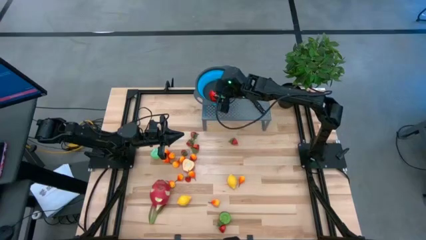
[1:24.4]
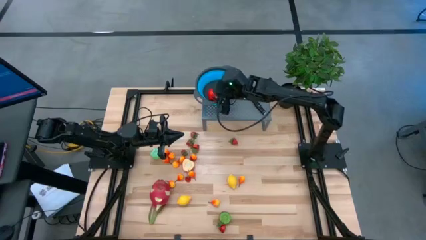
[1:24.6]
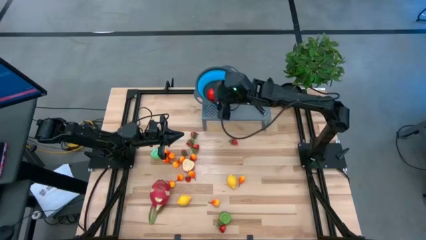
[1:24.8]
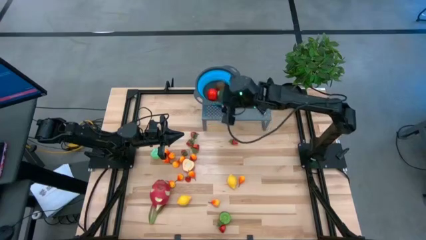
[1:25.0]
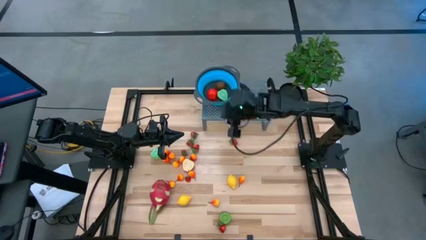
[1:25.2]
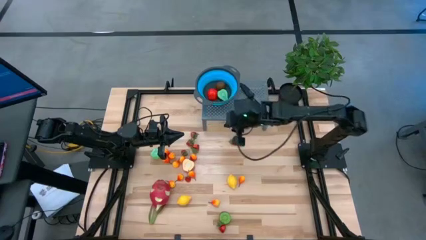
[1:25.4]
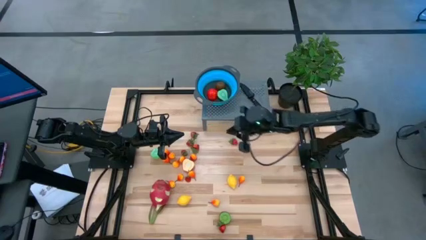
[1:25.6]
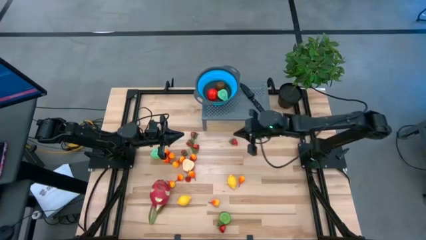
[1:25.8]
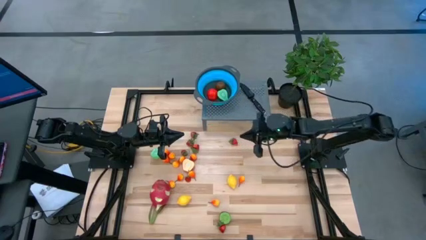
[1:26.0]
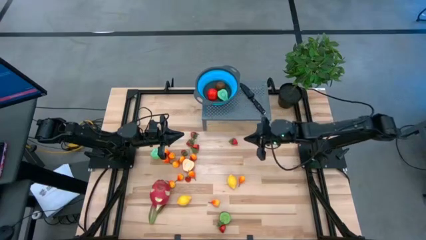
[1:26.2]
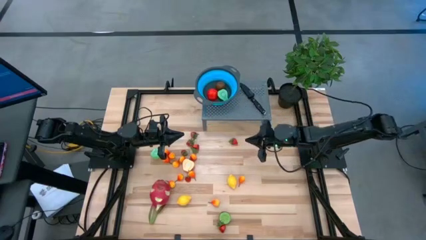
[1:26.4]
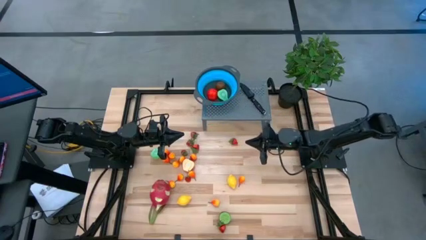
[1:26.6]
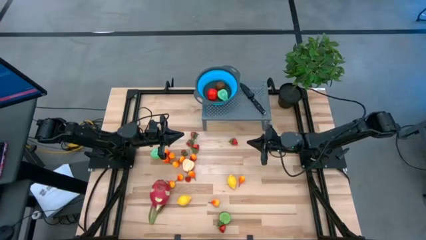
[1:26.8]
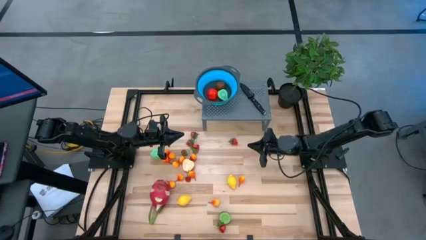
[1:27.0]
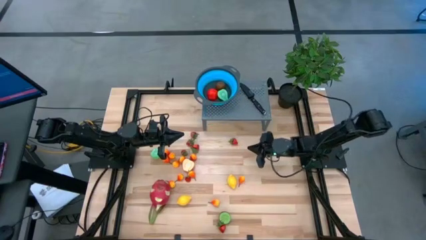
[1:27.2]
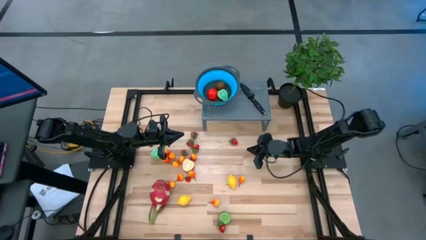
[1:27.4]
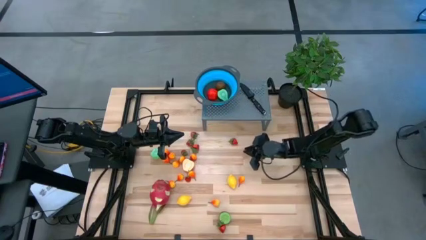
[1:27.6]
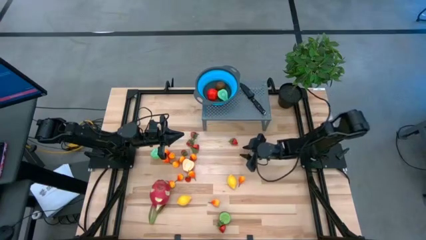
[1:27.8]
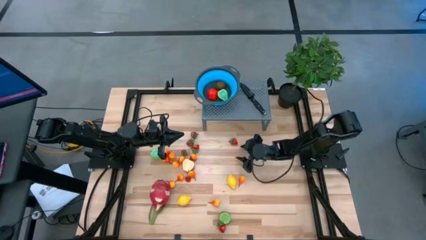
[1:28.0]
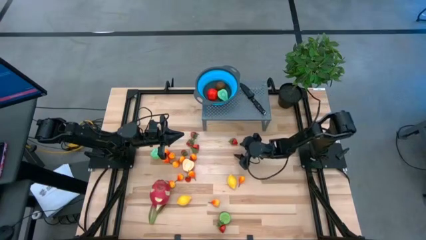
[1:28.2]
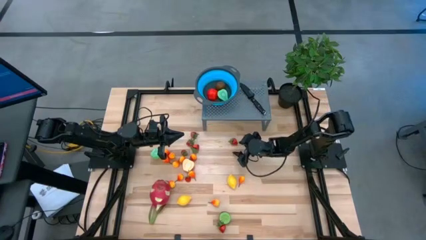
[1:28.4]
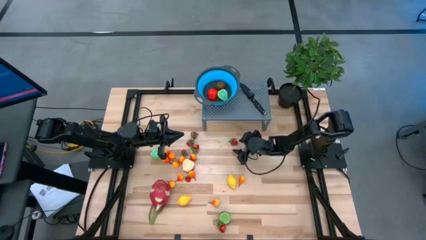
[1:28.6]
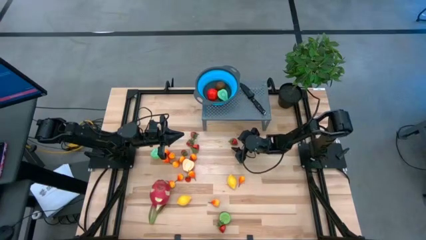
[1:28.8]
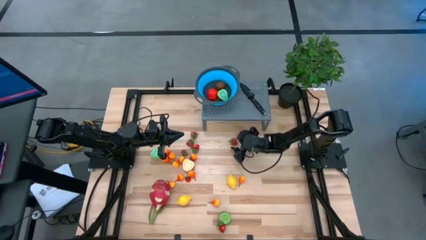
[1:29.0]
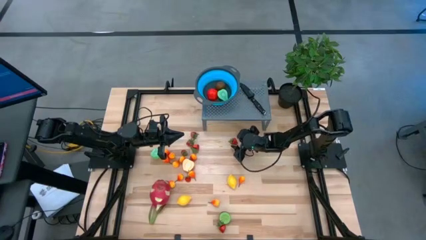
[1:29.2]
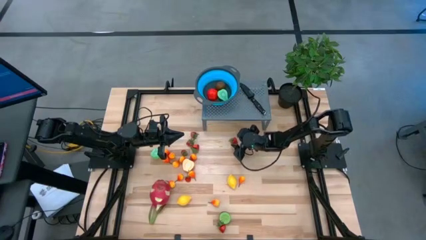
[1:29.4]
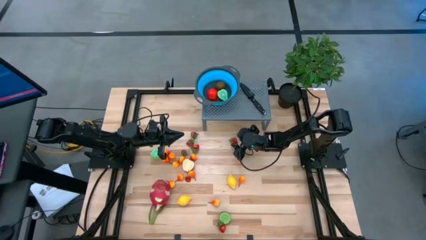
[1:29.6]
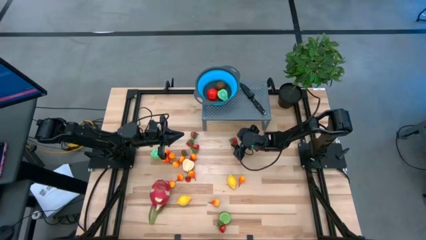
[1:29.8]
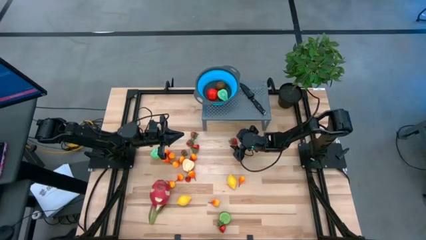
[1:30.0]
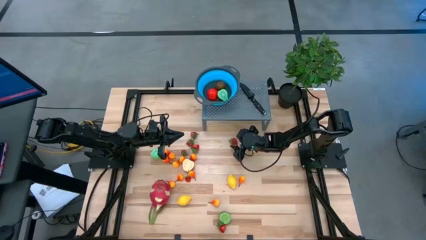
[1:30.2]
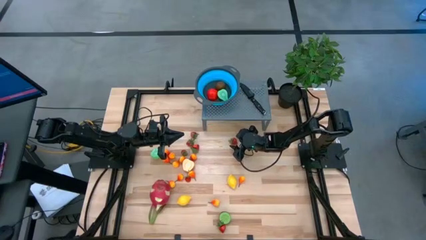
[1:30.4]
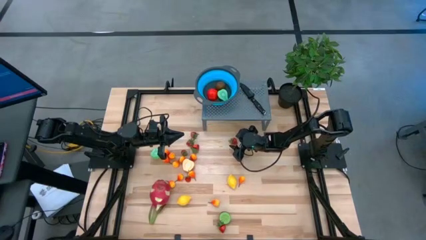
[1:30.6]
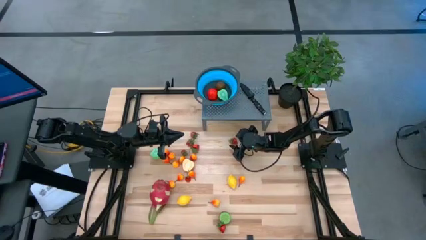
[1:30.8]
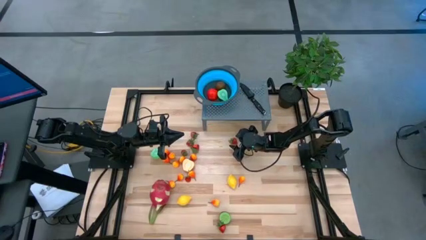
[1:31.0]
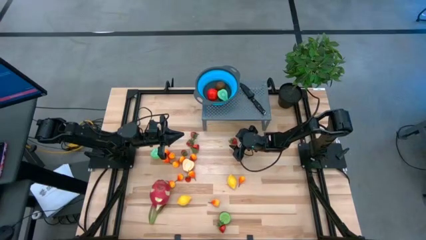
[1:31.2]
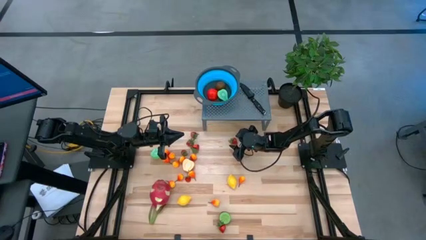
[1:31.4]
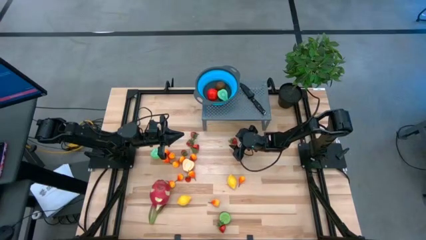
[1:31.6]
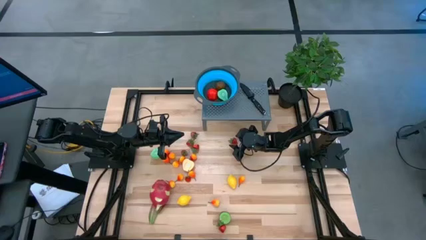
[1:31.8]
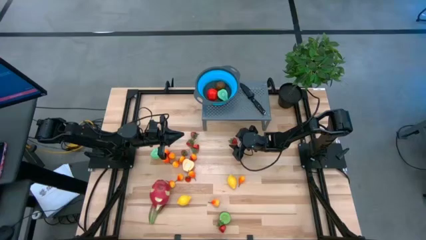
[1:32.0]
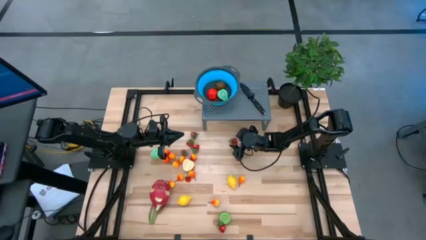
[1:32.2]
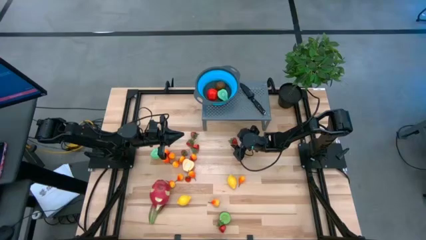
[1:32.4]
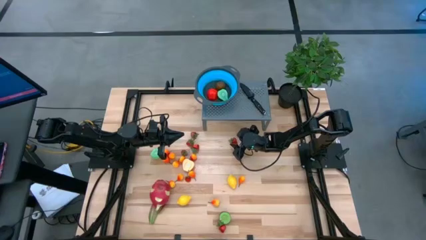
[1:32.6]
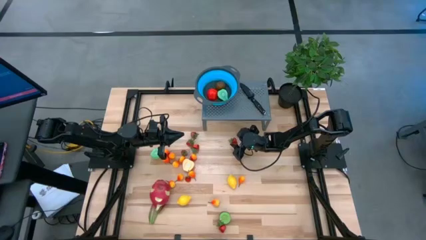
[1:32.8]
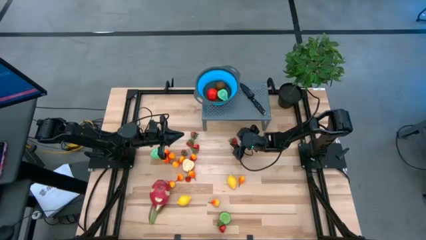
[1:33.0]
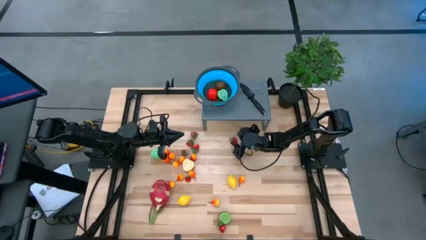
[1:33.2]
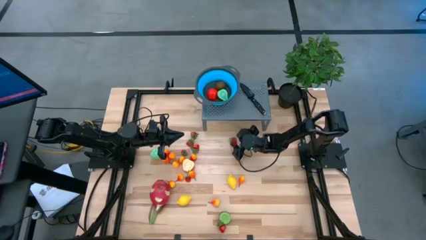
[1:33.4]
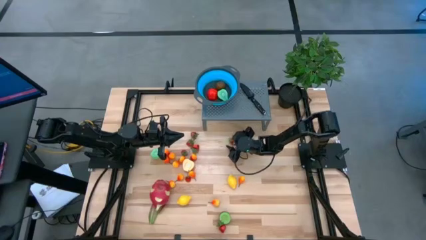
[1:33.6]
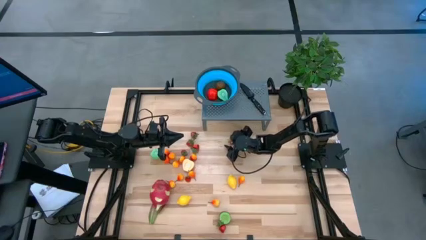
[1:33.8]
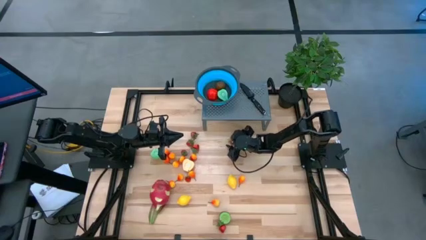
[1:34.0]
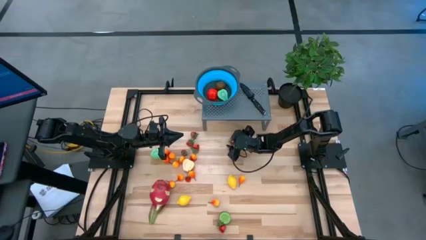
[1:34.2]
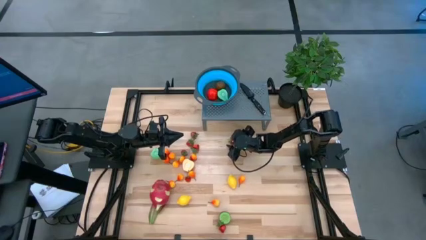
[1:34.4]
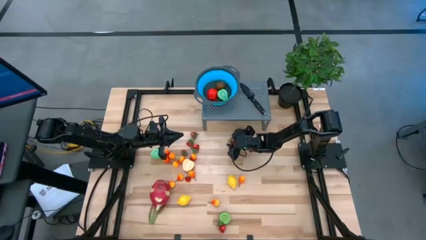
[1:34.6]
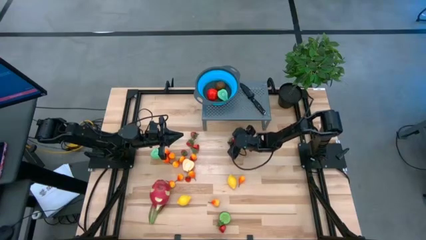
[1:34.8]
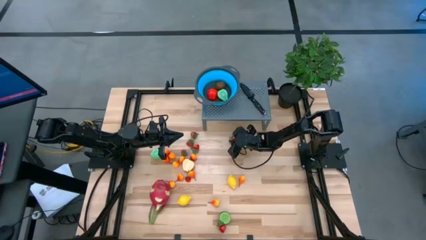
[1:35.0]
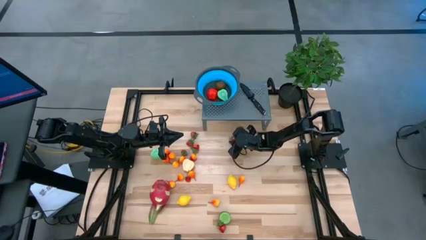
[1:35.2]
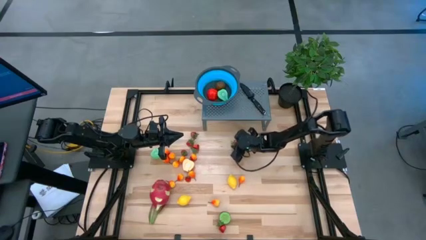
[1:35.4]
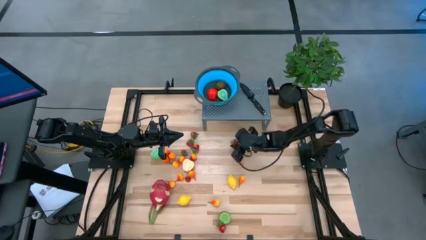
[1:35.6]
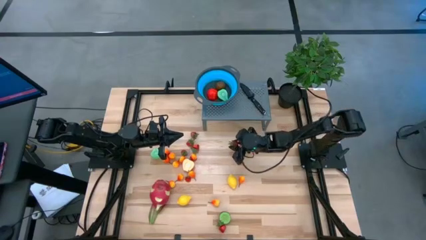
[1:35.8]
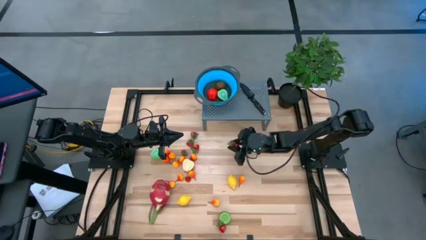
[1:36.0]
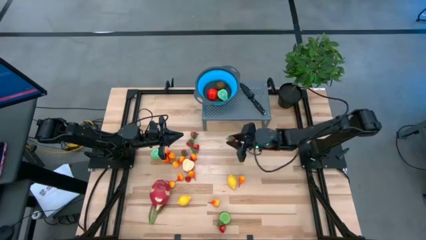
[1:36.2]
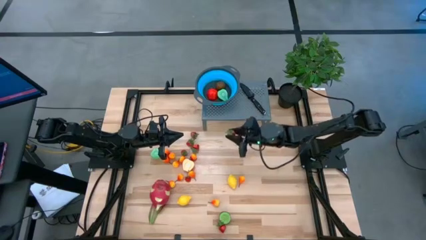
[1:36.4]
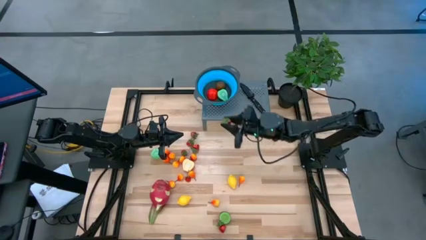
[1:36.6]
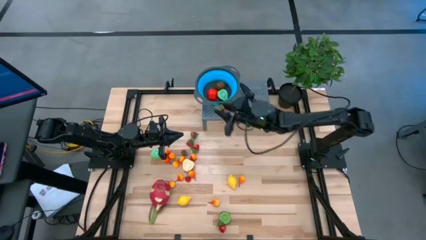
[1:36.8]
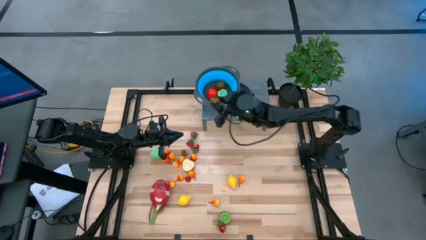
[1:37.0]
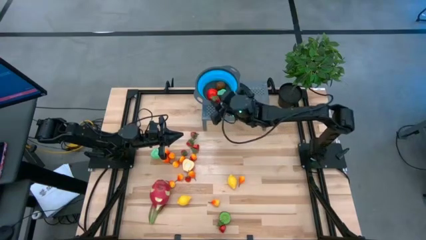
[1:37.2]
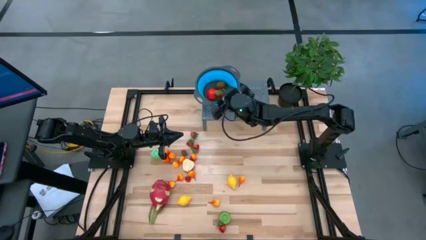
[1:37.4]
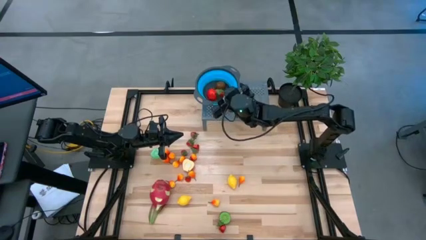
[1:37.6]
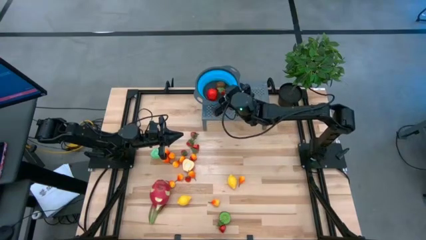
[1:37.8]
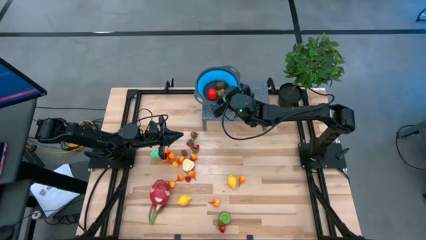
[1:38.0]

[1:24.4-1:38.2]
Task: Pick & Place Fruit
Put the strawberry into the strainer bowl

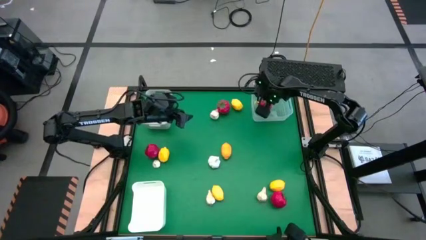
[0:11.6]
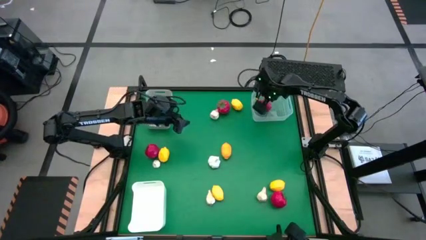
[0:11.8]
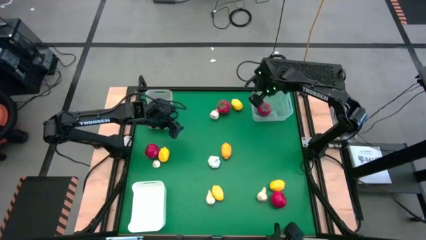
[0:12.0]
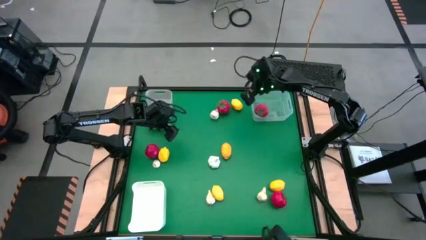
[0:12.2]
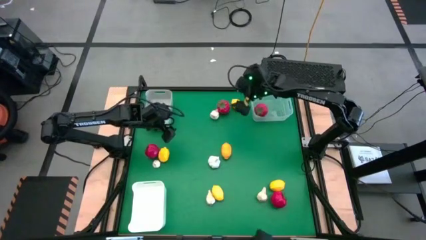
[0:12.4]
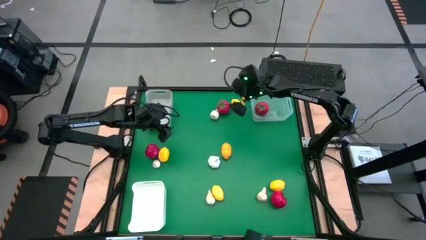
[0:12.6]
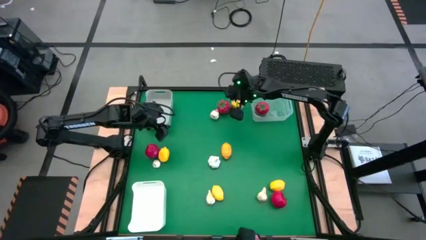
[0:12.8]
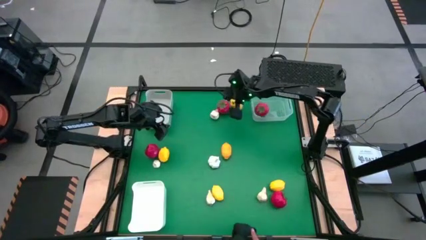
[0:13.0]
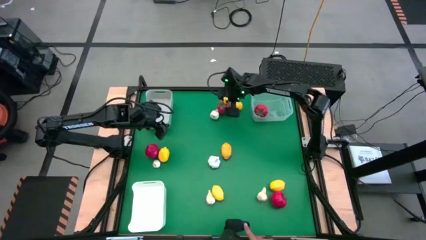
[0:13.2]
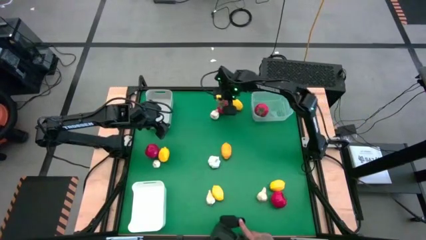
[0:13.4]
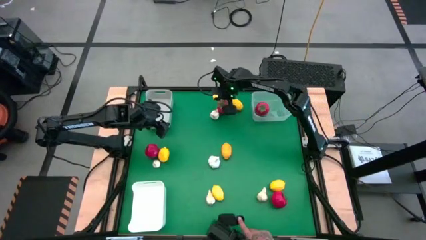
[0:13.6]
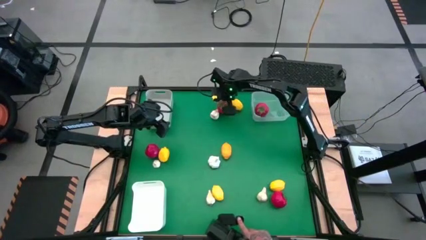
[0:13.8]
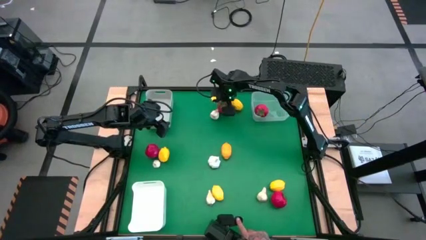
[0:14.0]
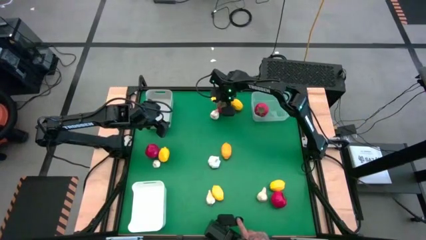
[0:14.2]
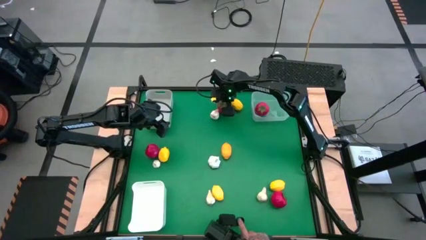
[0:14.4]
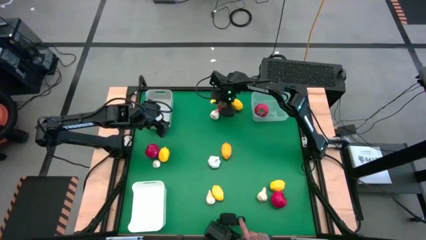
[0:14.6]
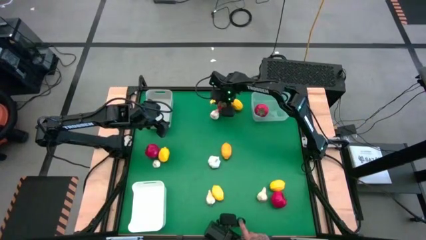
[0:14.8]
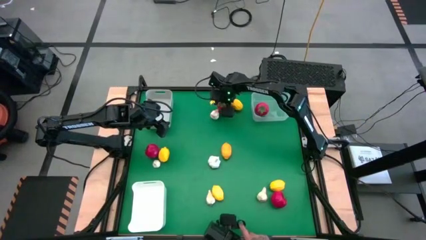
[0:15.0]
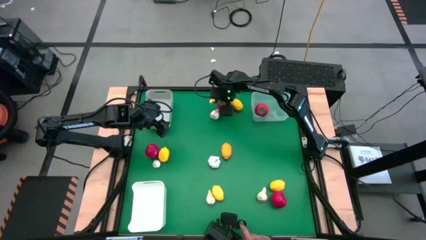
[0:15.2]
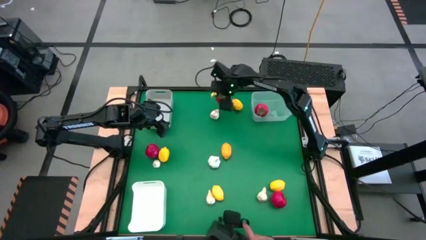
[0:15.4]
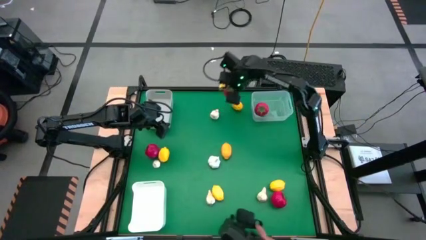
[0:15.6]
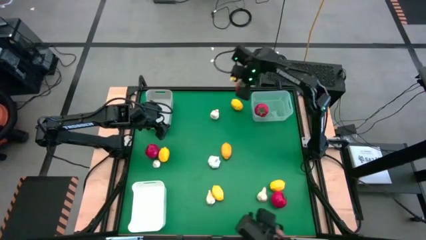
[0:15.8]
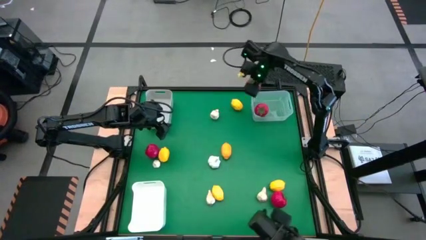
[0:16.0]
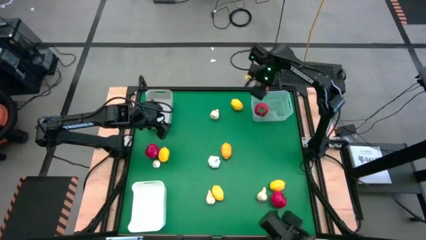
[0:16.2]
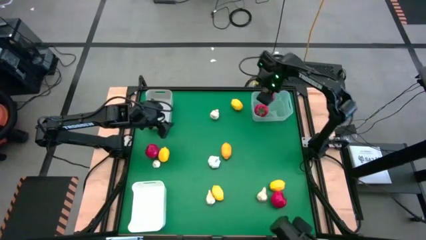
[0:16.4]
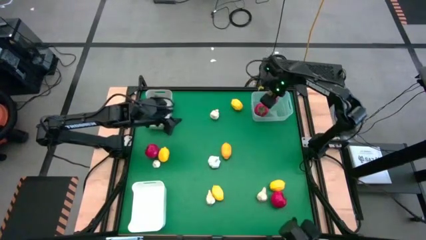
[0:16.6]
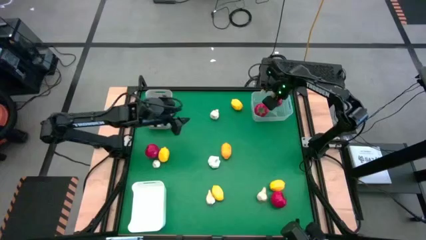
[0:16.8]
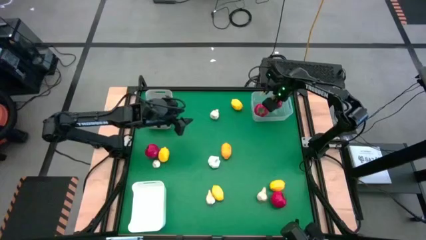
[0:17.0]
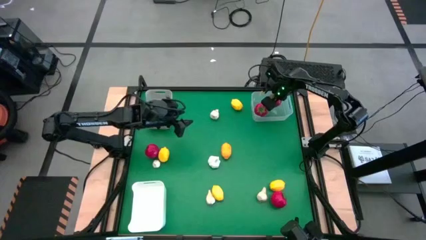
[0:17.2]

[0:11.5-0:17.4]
Task: Sort produce into baskets
Put the tomato into the transparent bin
